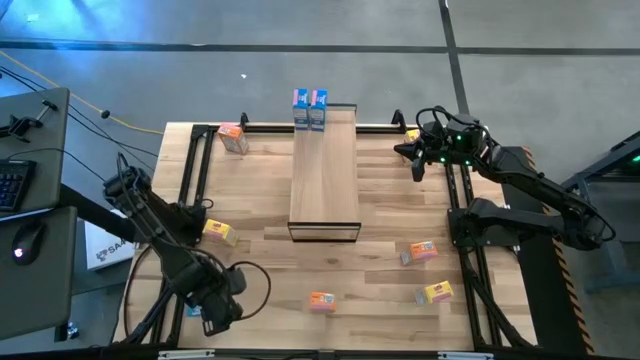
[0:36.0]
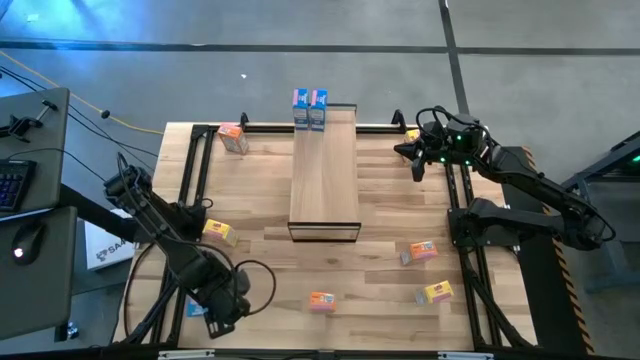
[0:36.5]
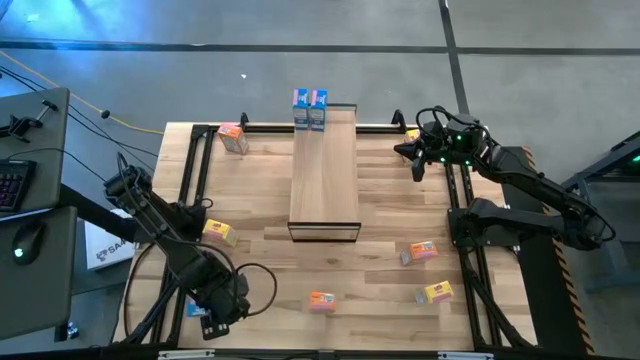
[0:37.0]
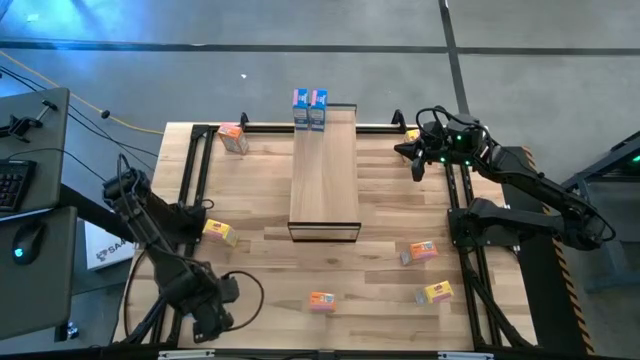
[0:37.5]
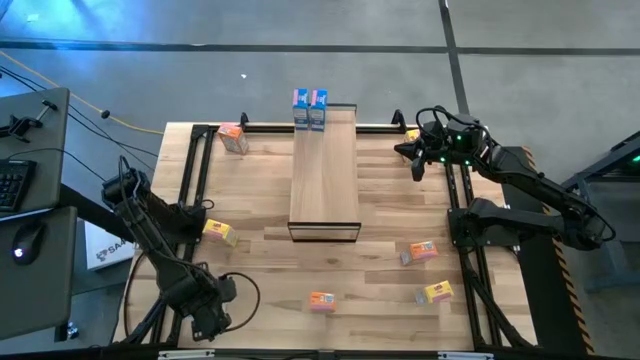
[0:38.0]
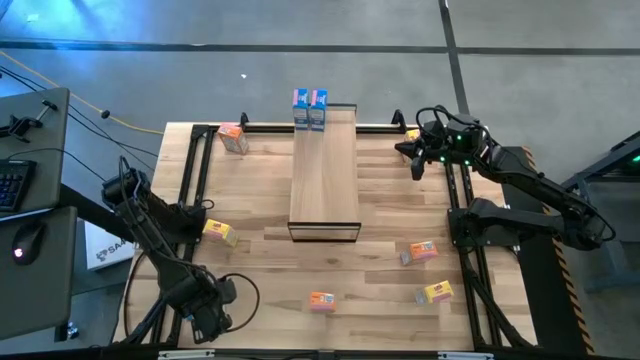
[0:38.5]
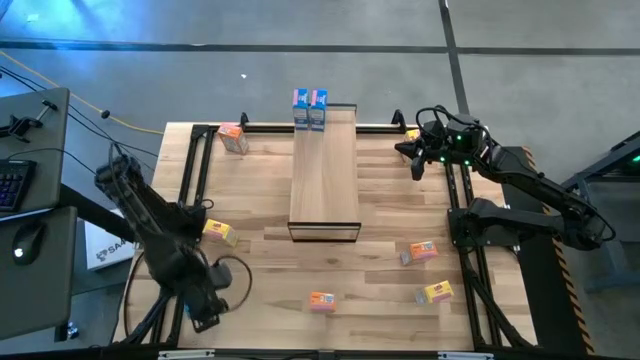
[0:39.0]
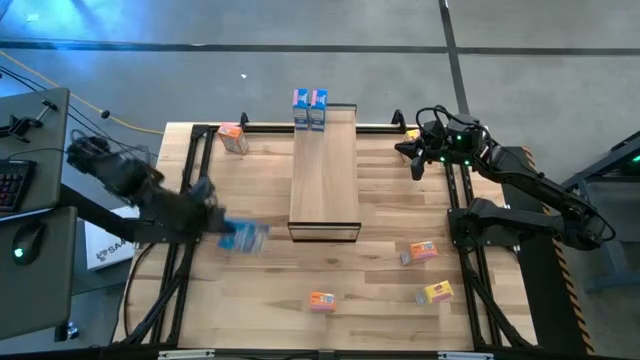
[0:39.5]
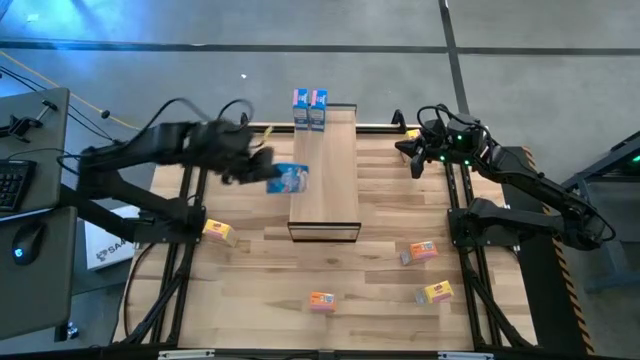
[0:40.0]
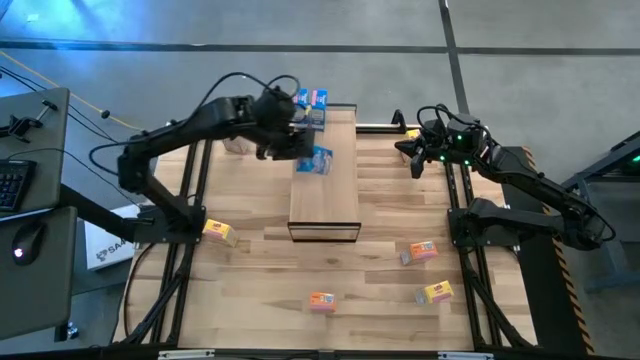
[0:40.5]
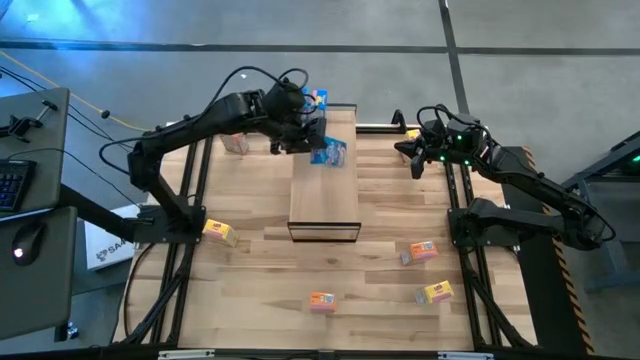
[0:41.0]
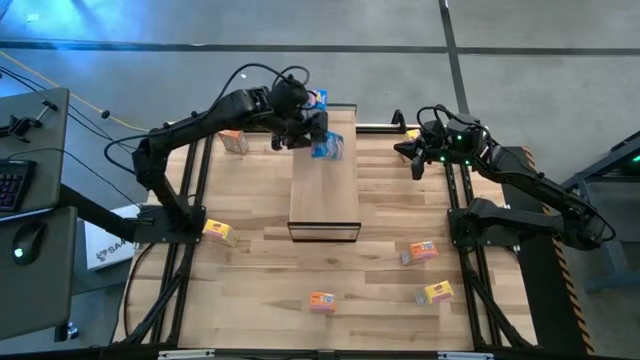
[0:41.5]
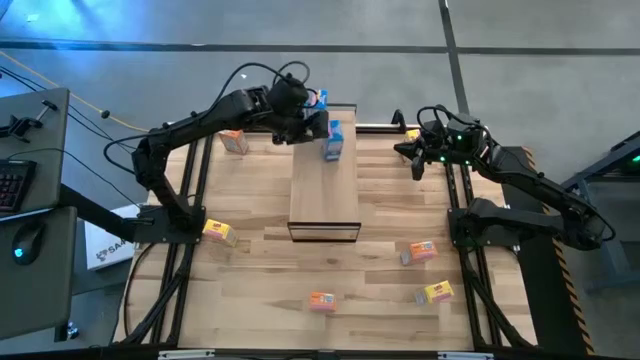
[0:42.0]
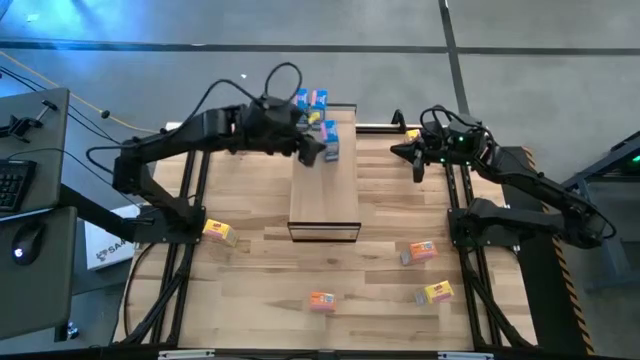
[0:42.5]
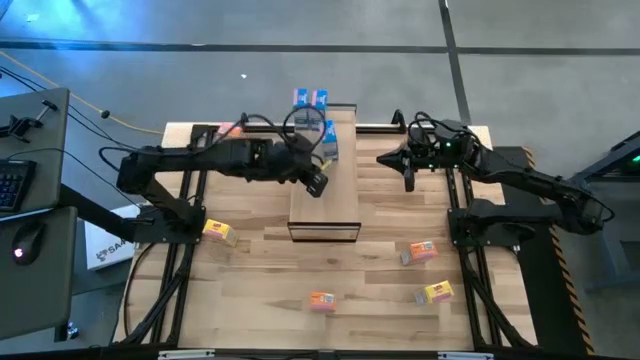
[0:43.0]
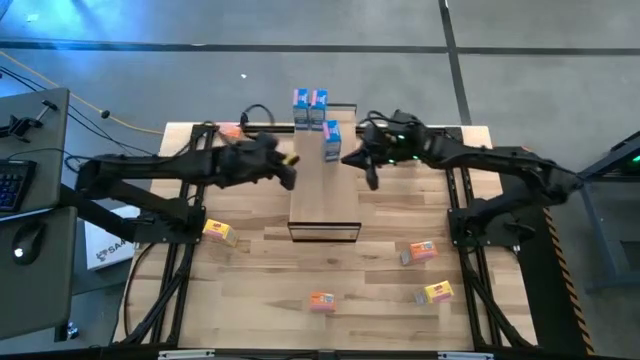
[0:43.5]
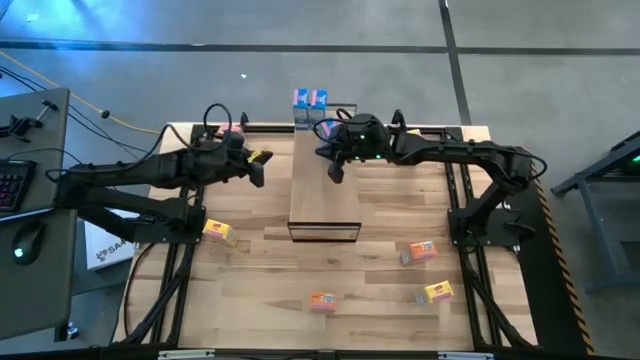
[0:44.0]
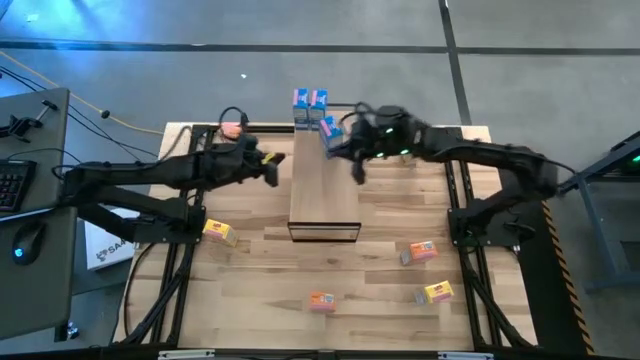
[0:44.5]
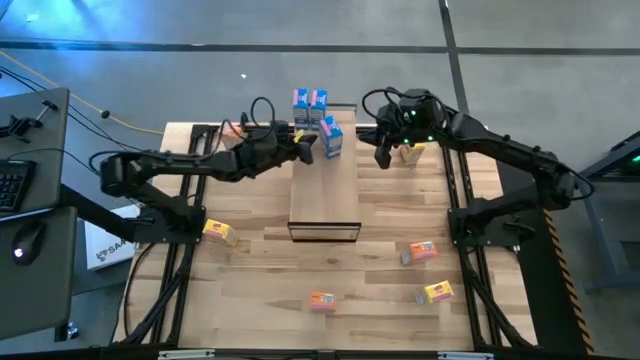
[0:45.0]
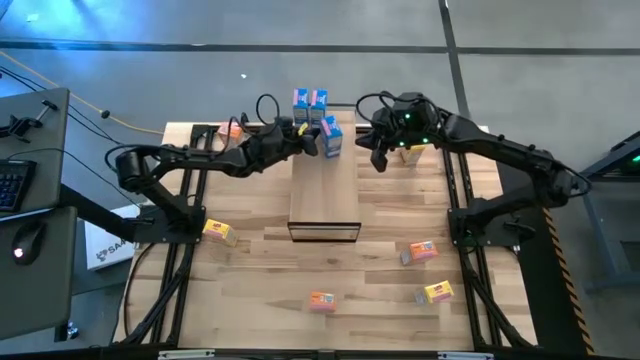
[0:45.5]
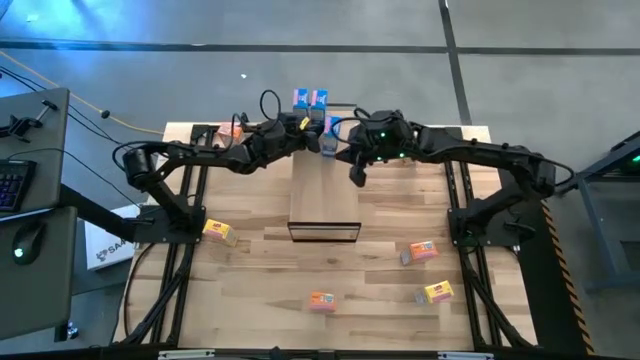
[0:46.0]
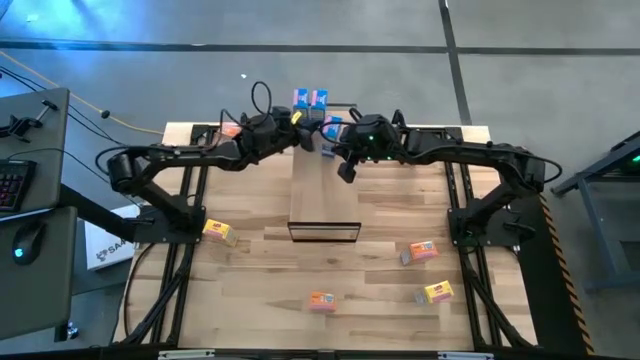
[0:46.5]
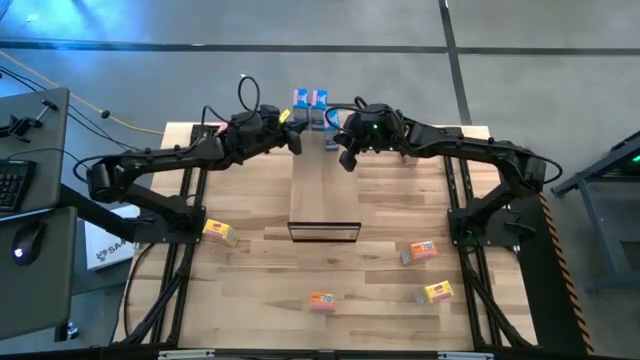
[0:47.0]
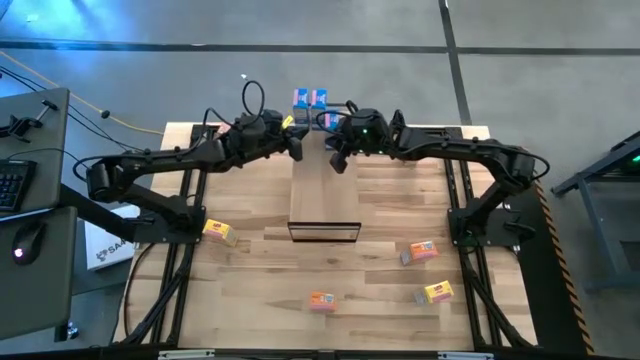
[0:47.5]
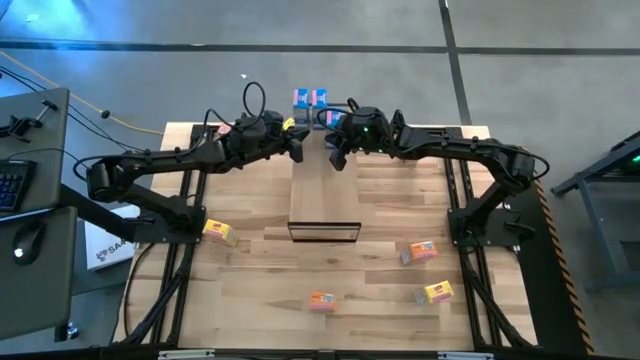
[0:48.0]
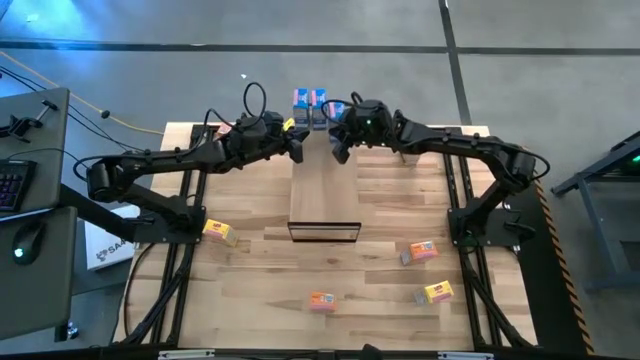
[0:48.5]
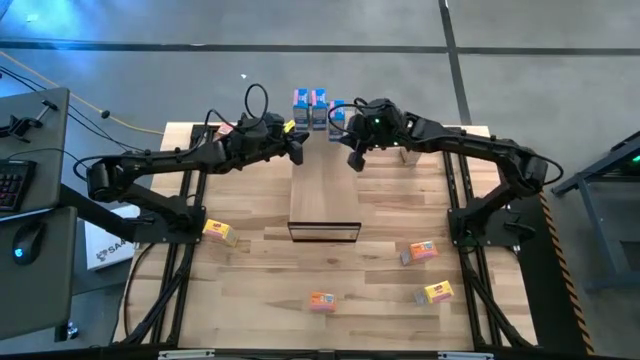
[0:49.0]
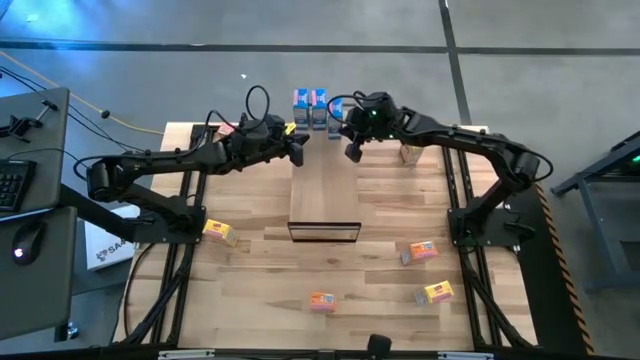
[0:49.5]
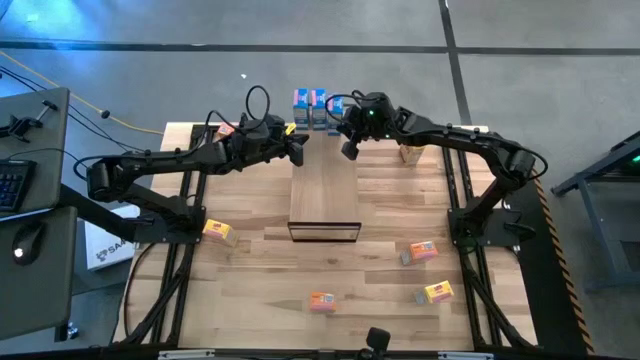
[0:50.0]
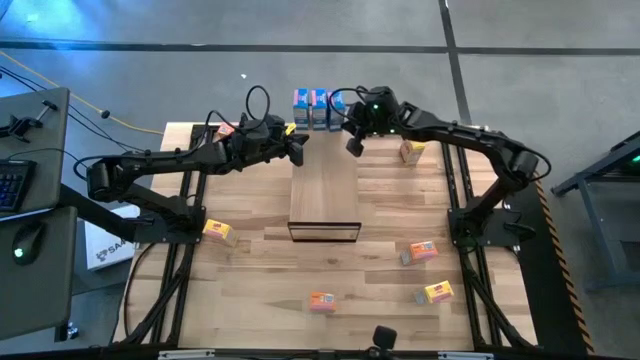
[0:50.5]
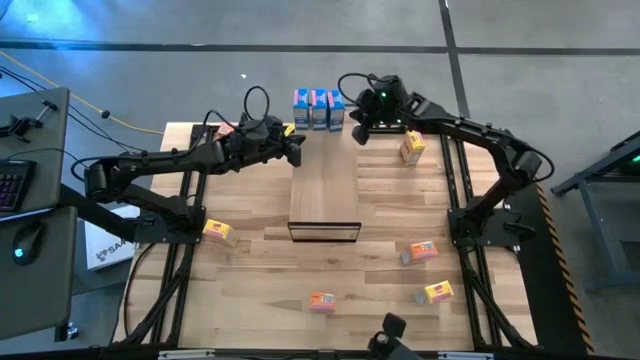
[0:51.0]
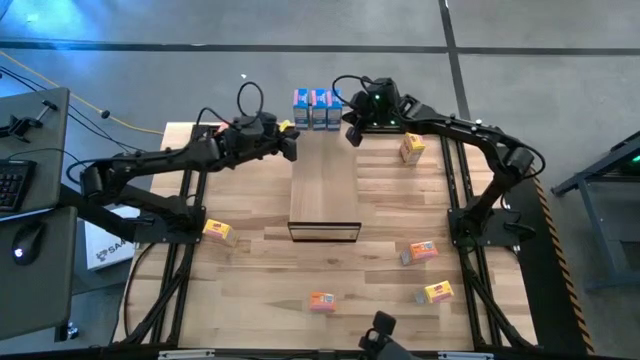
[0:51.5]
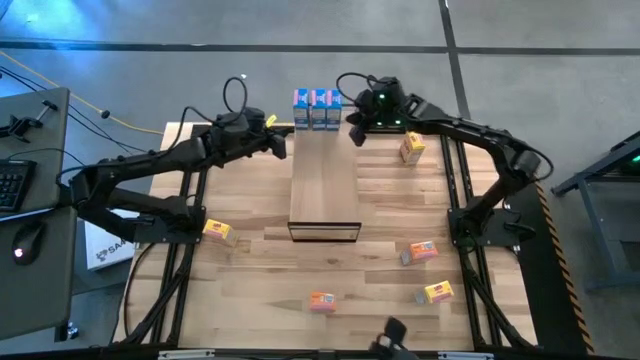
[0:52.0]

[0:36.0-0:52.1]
Task: Stack cereal on shelf
Put the blue cereal box on the shelf aligned with the blue cereal boxes

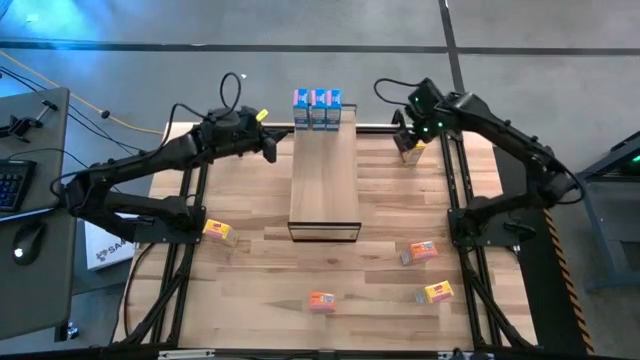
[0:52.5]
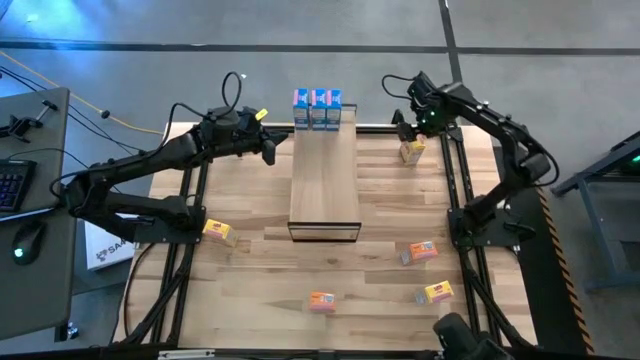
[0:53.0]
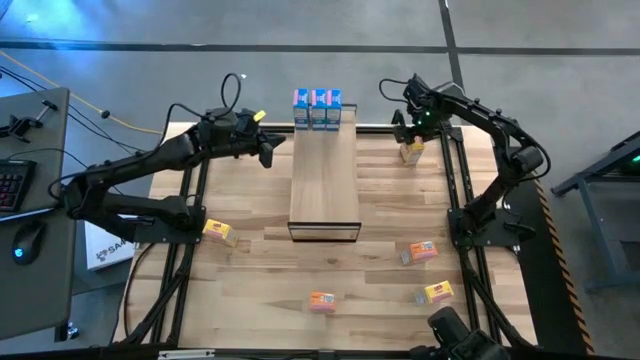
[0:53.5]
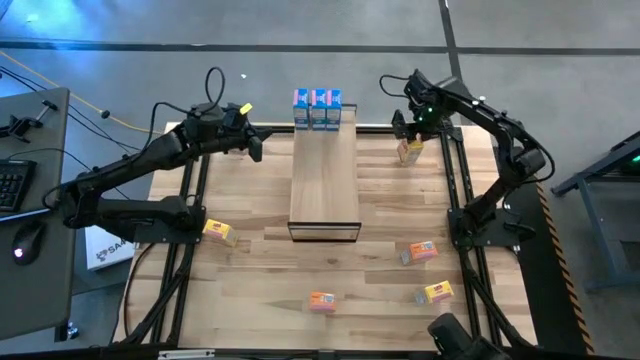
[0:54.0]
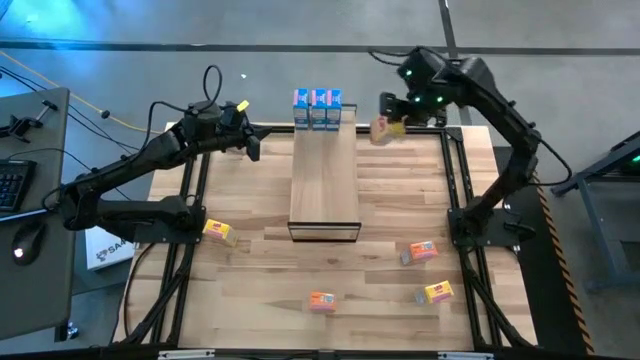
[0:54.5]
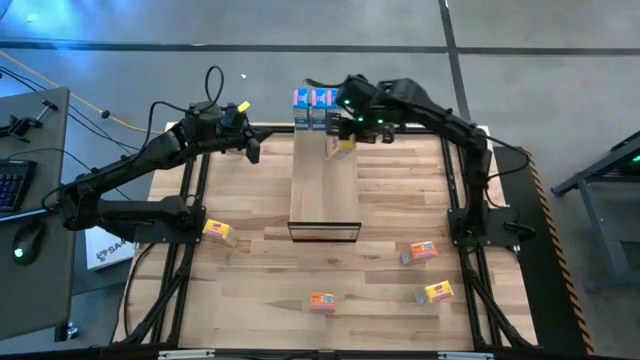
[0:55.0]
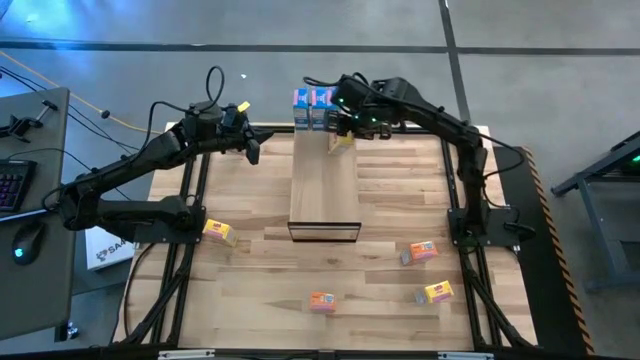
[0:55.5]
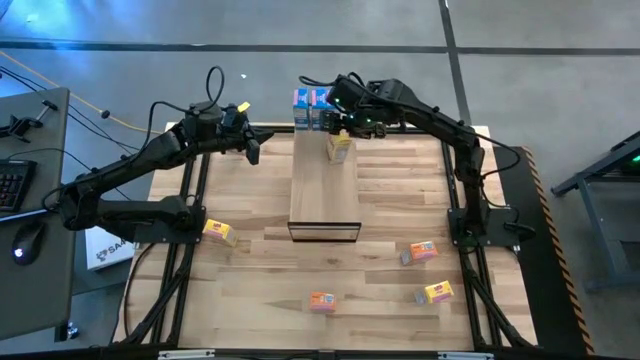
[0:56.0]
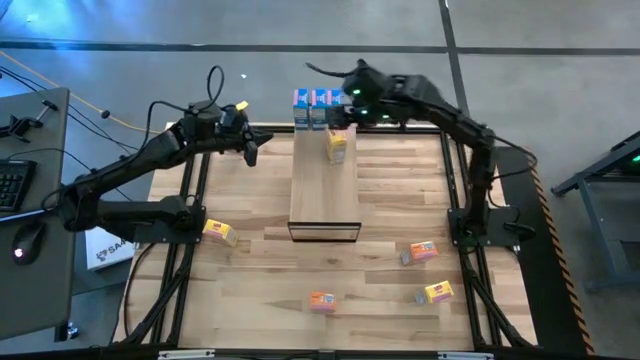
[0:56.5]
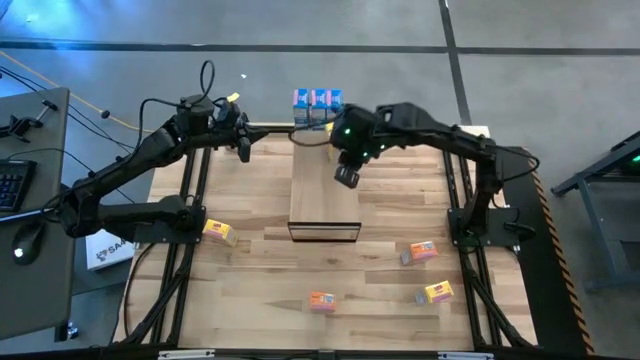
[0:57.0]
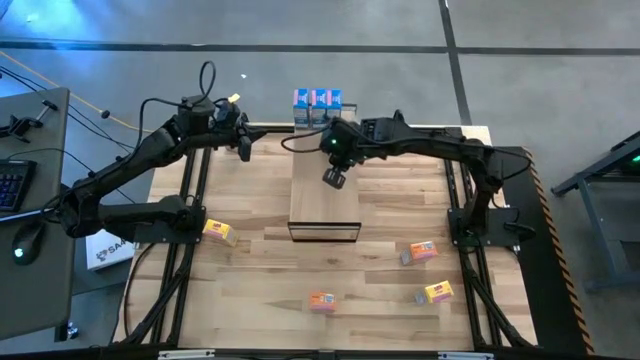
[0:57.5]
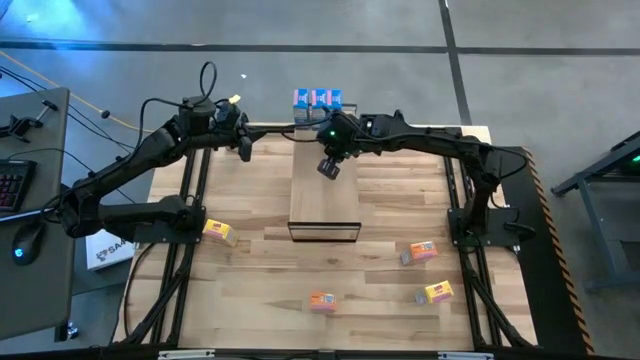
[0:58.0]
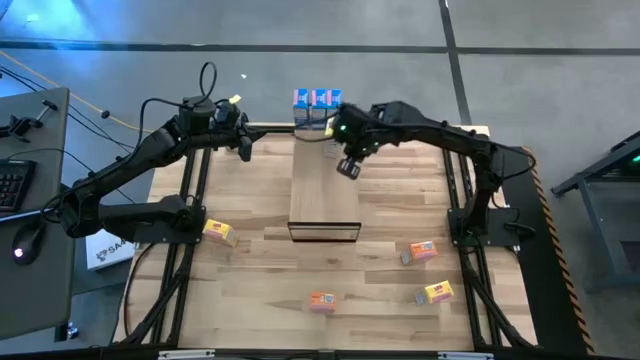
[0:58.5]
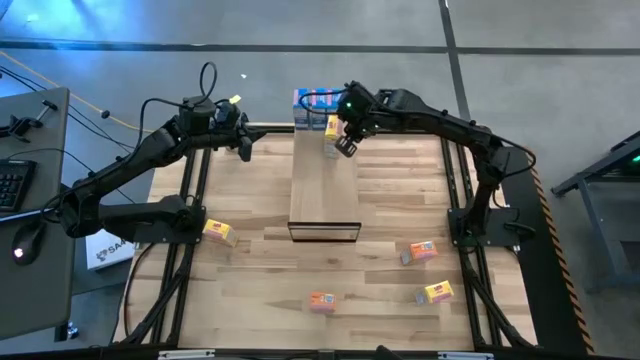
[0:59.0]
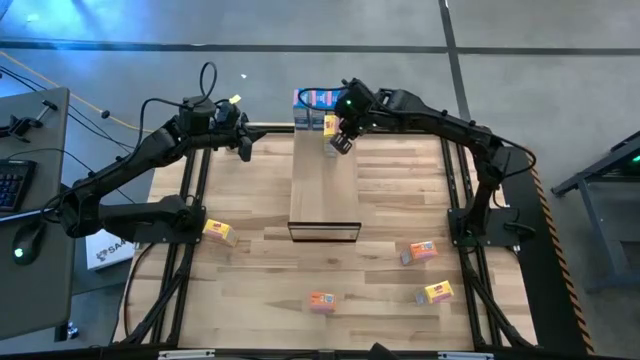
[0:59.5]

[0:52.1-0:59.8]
Put the top yellow cereal box on the shelf
